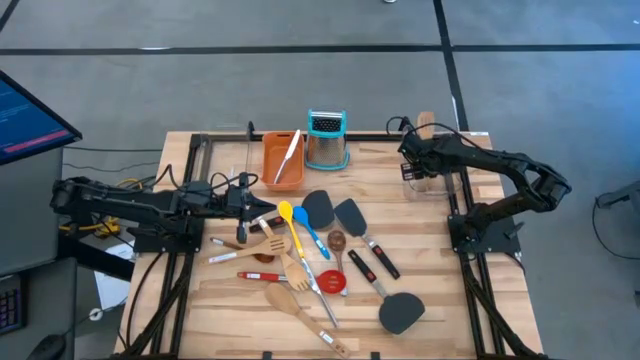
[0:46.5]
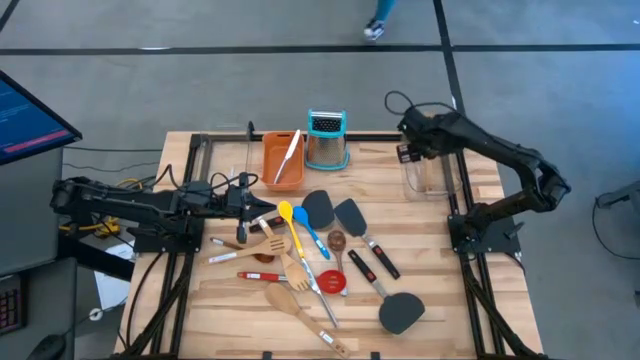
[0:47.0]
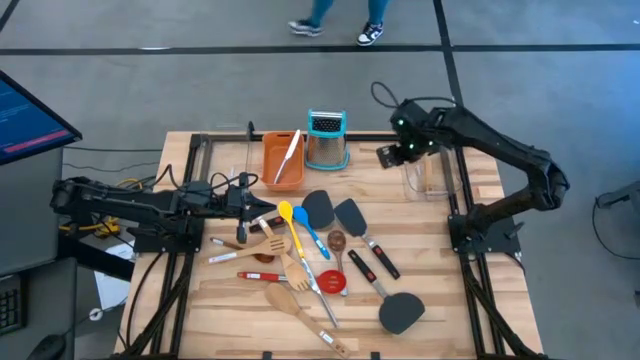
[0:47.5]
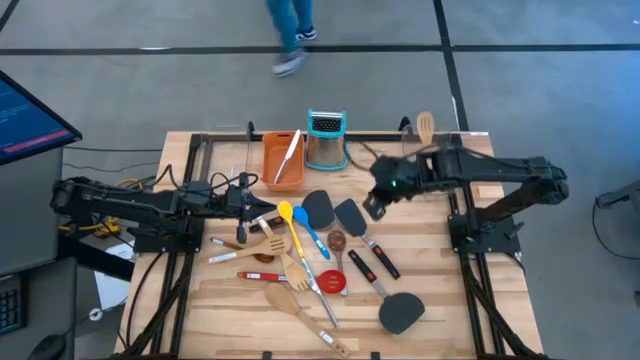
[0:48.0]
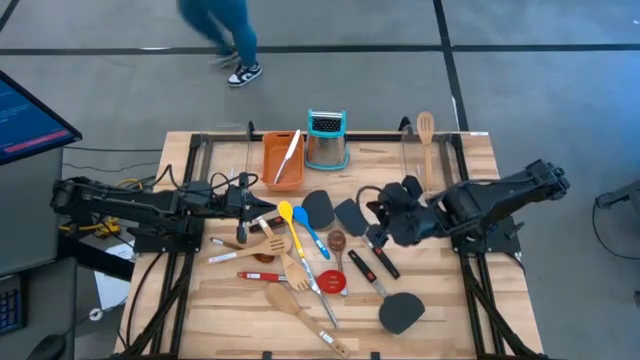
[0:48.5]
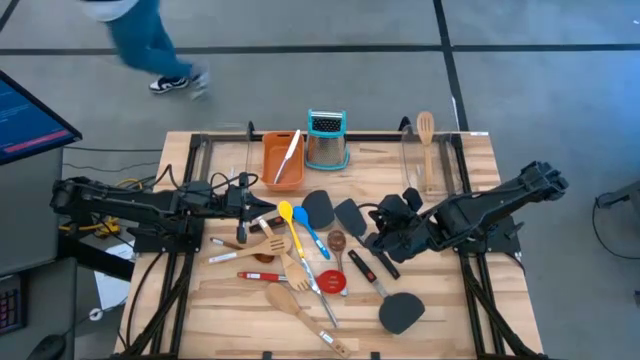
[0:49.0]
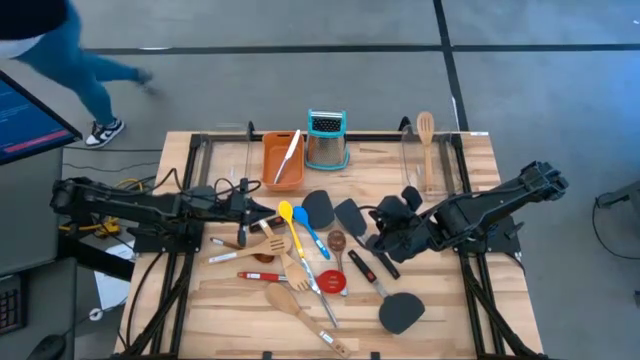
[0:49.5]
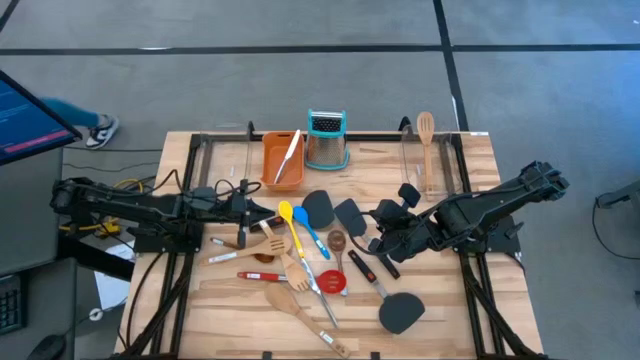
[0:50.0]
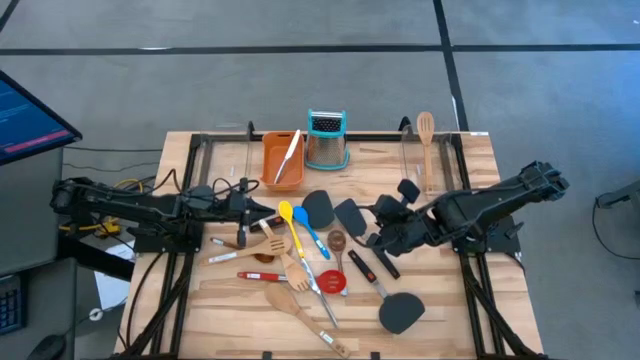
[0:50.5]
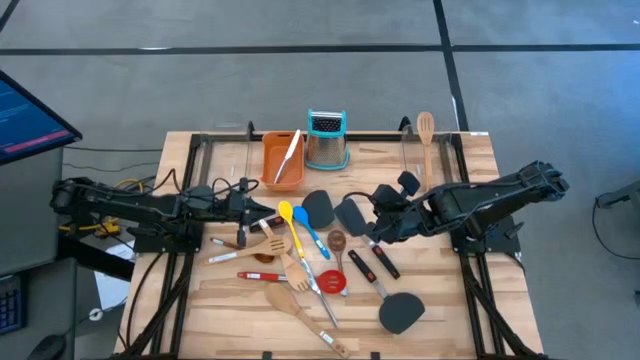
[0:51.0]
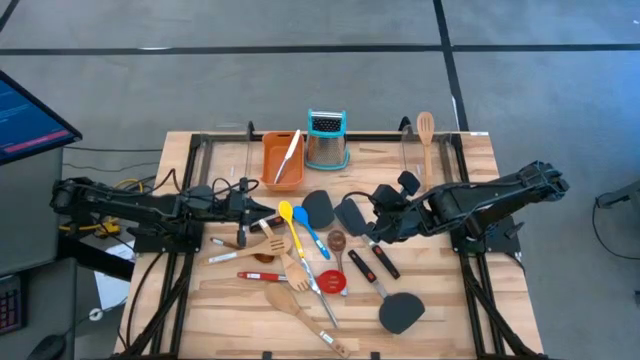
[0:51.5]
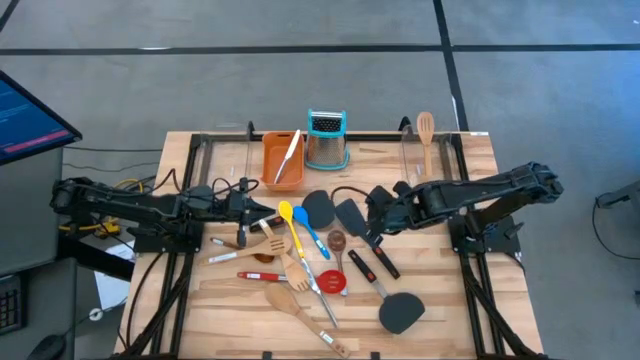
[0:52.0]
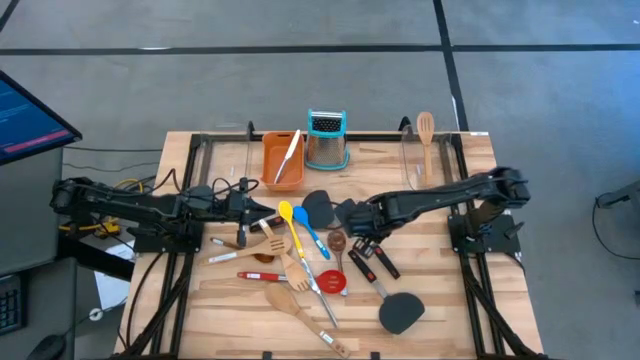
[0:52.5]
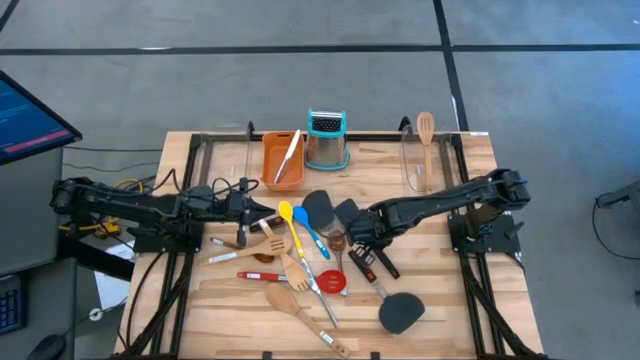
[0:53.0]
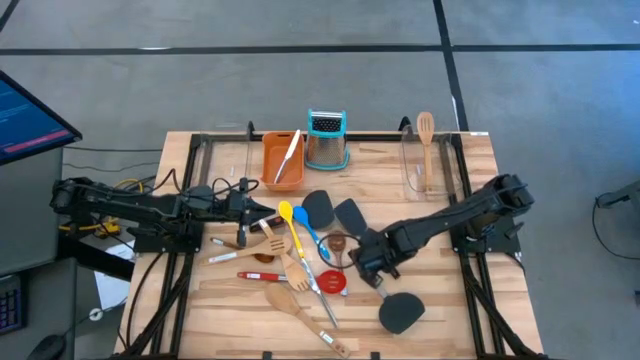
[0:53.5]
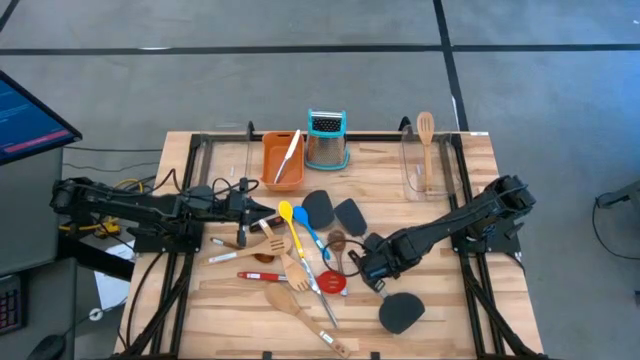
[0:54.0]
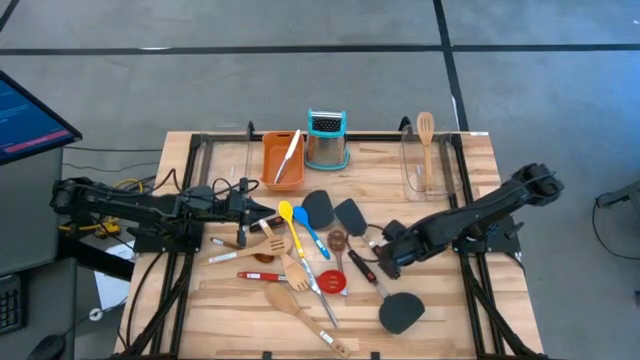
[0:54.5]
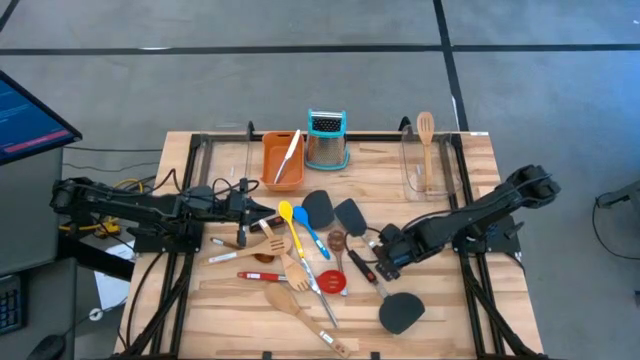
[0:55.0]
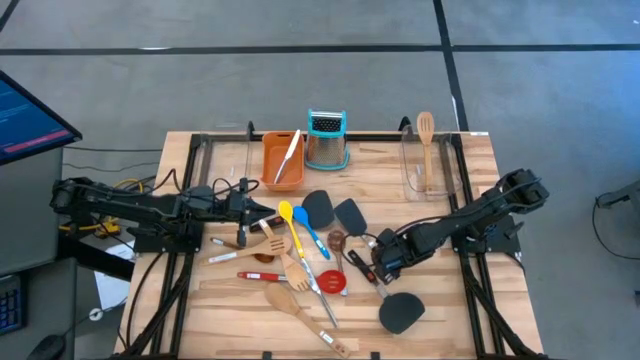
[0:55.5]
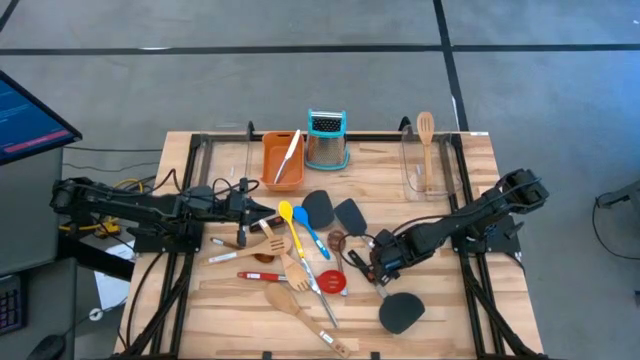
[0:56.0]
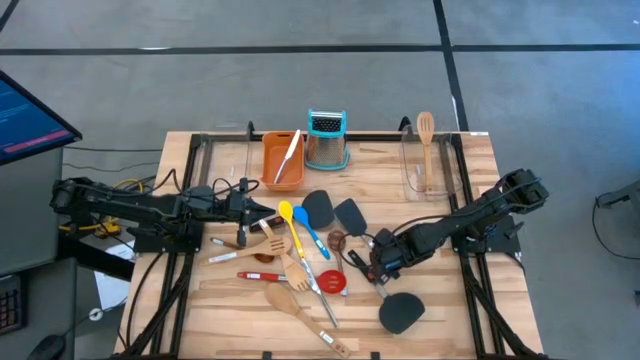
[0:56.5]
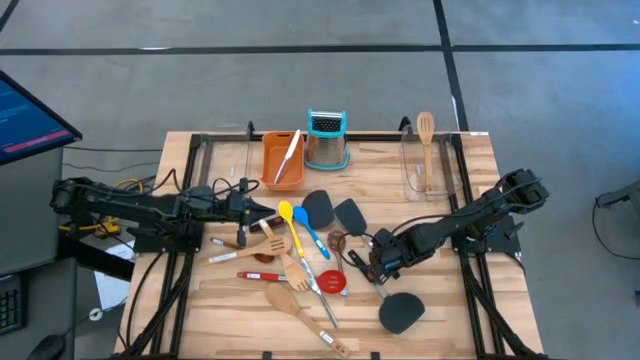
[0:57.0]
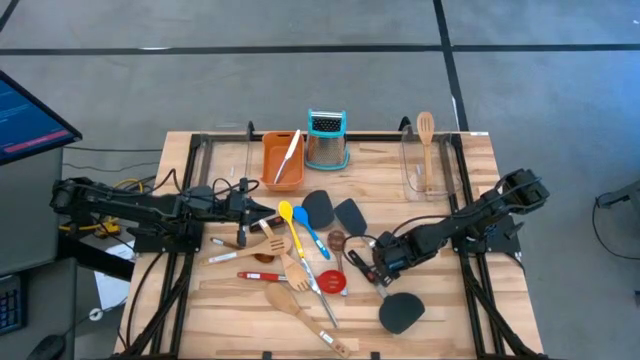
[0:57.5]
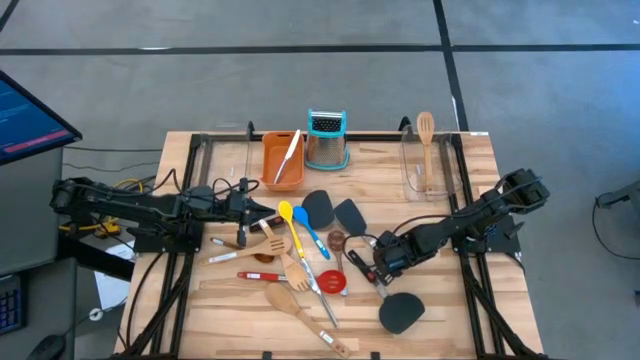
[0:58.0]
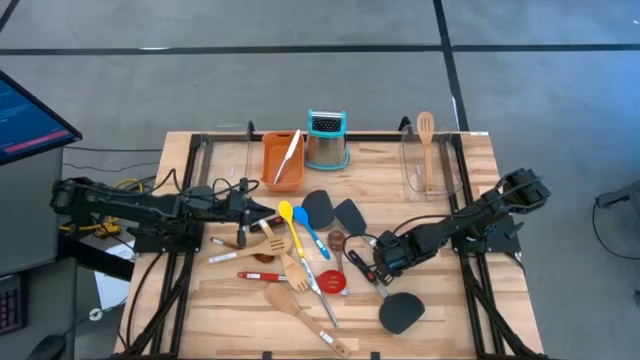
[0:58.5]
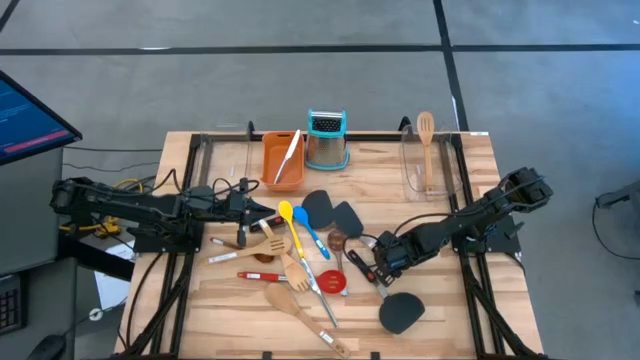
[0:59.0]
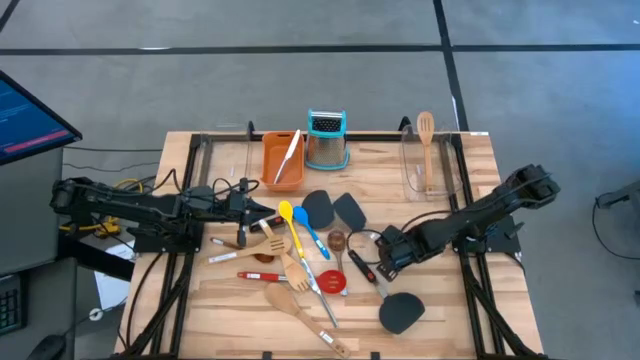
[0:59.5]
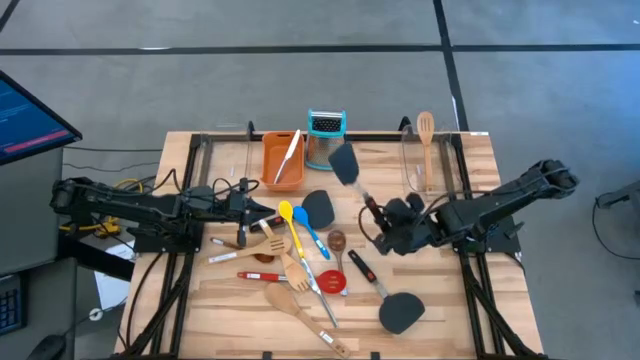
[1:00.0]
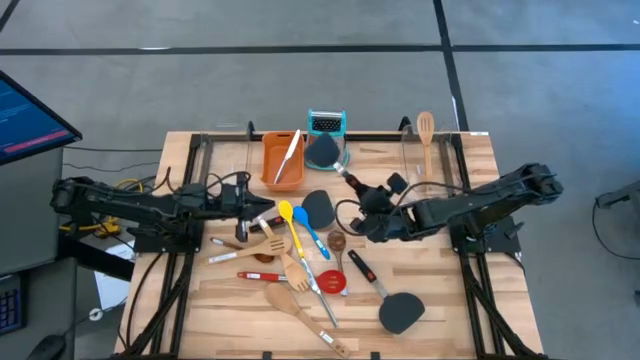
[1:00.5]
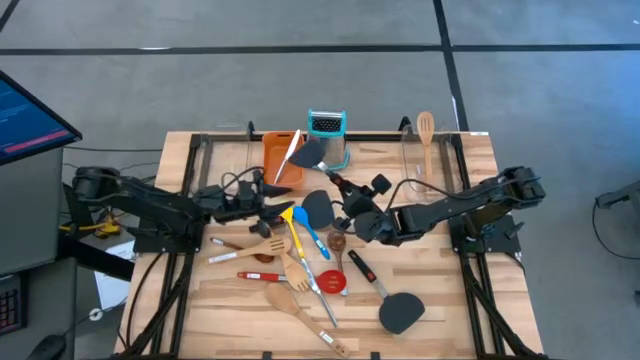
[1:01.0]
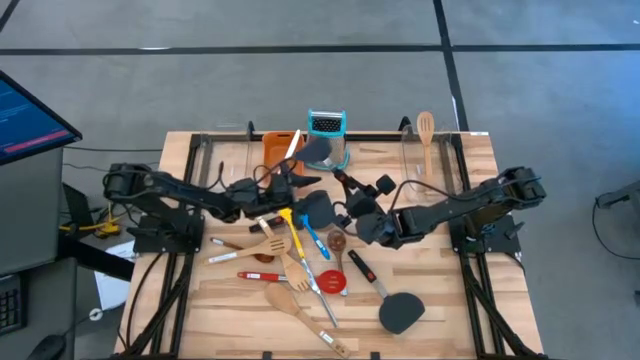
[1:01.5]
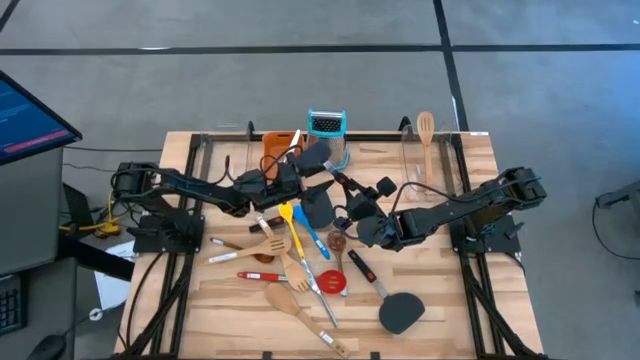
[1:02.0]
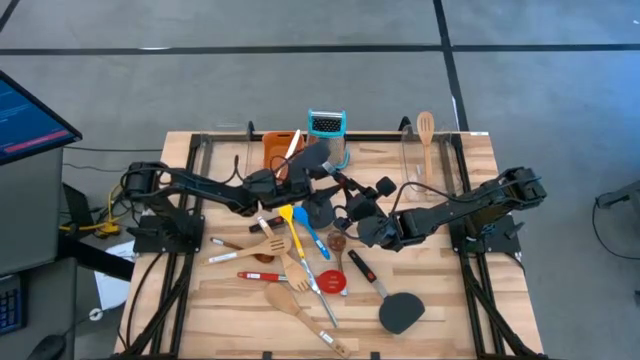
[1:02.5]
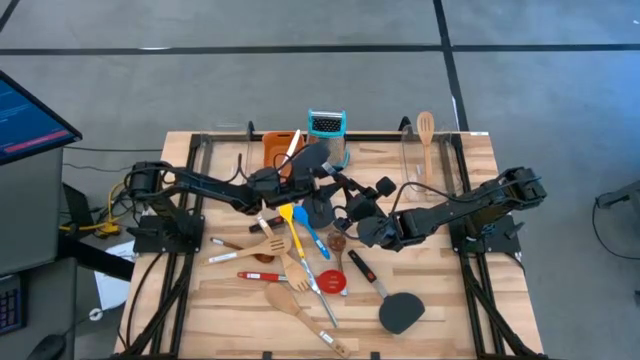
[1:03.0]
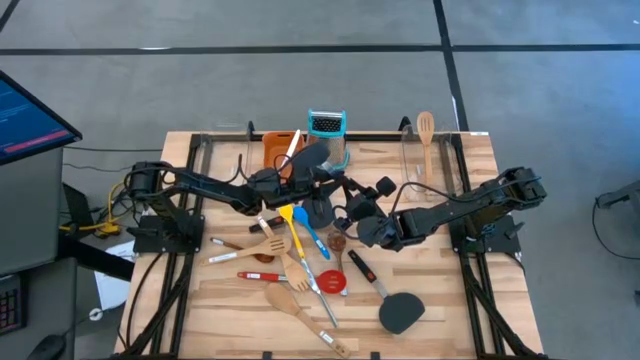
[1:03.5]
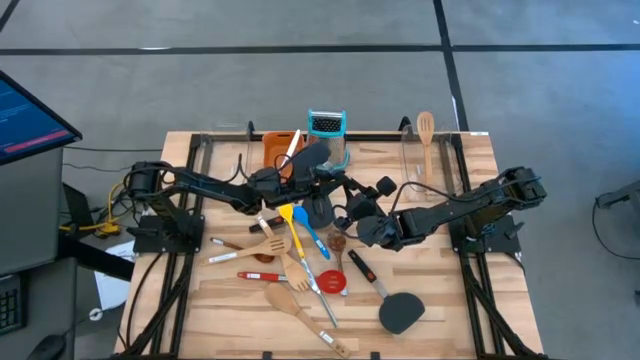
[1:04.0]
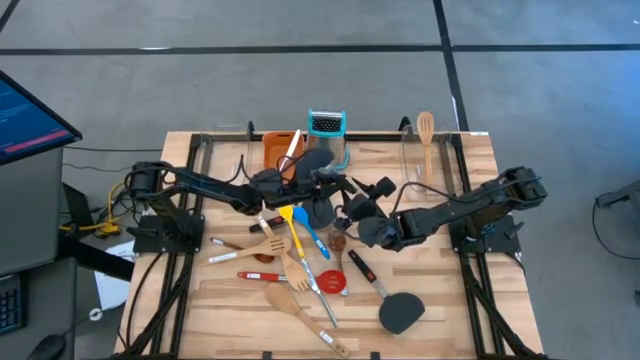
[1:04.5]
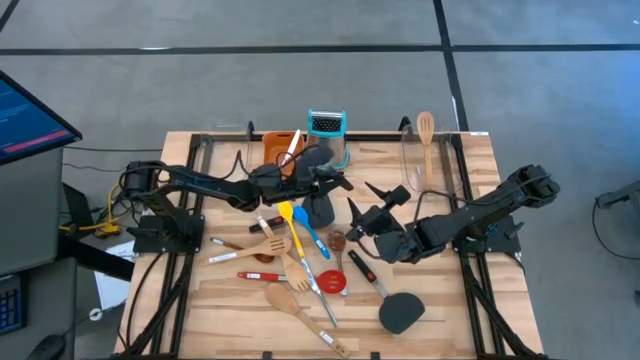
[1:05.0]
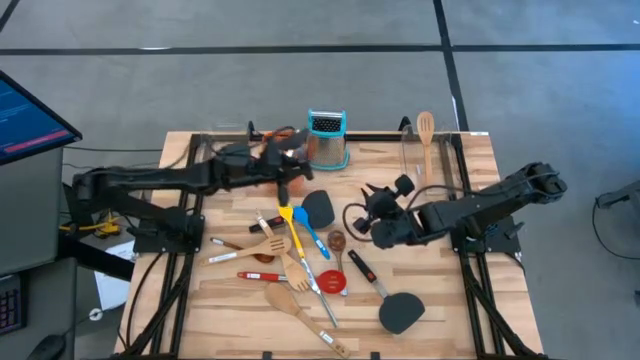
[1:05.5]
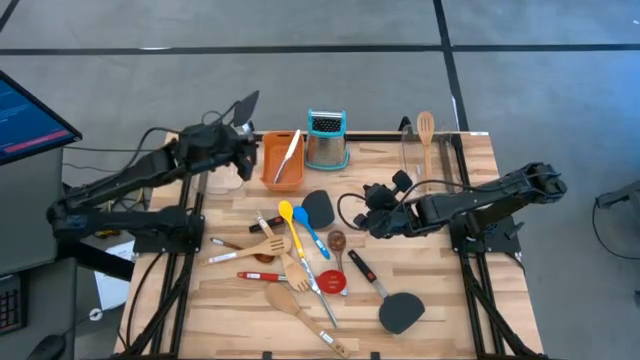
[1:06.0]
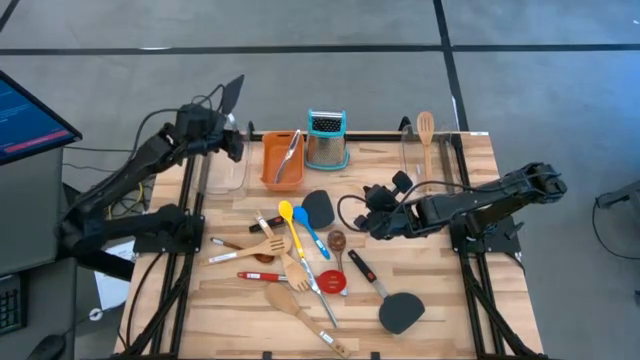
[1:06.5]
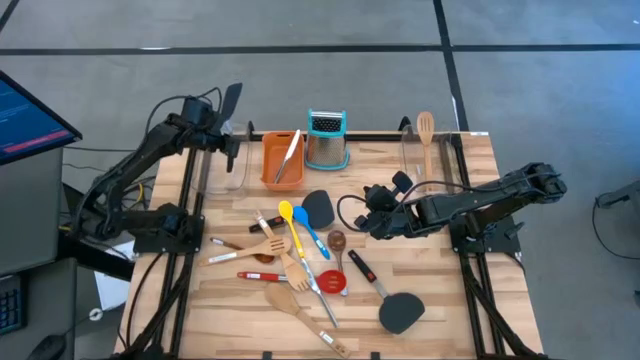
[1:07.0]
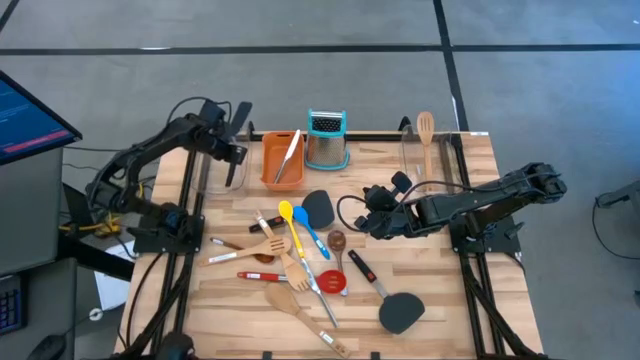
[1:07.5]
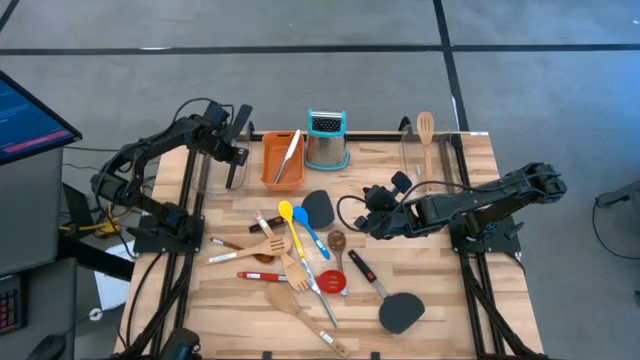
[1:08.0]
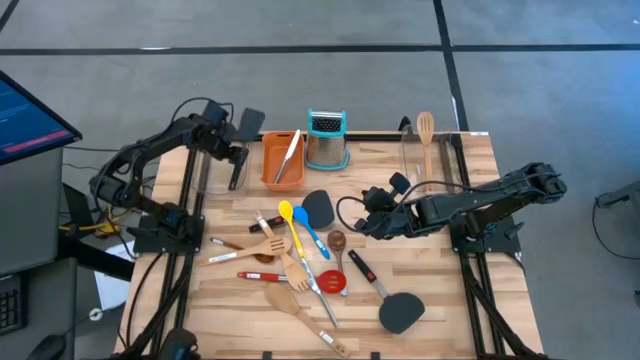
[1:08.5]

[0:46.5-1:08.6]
Task: Pick & Place Kitchen Items
Put the right black plastic spatula into the left transparent bin
